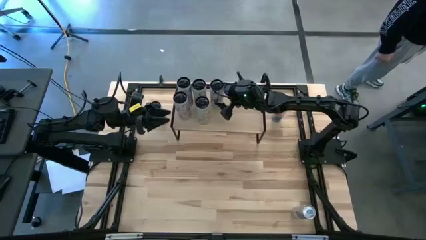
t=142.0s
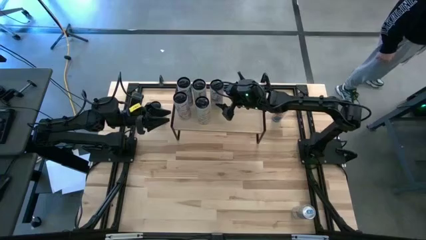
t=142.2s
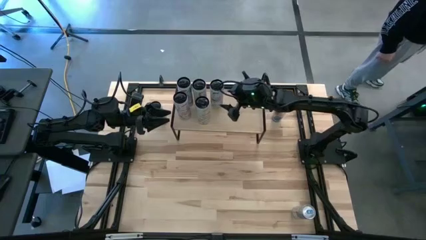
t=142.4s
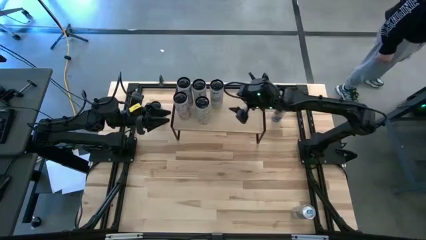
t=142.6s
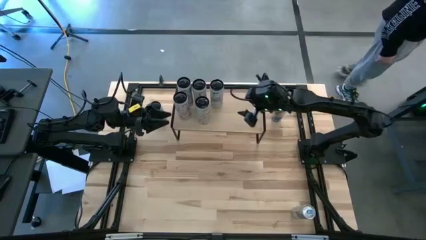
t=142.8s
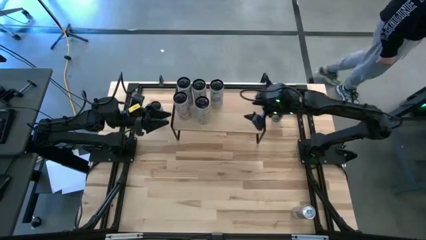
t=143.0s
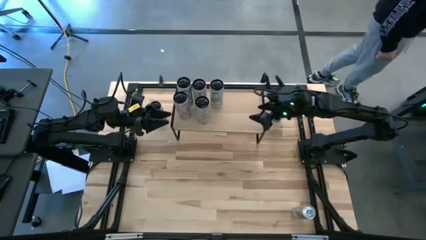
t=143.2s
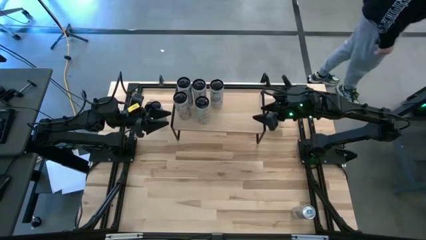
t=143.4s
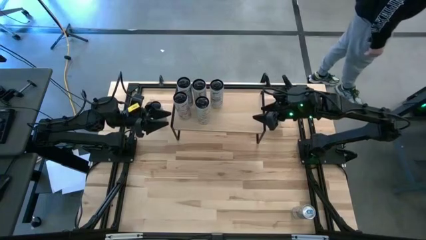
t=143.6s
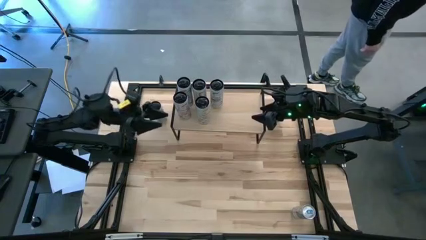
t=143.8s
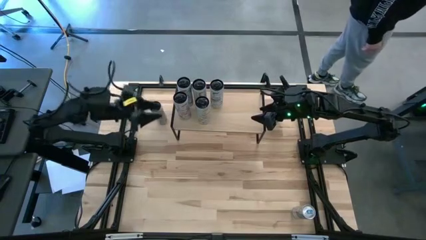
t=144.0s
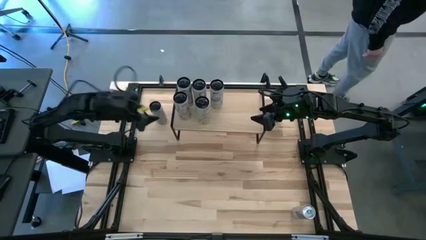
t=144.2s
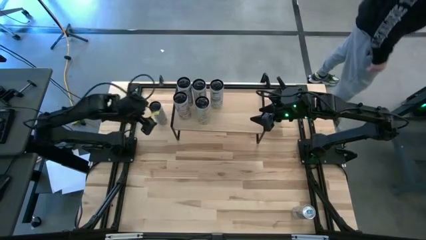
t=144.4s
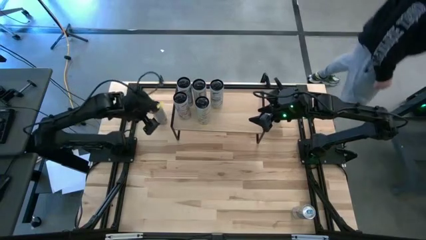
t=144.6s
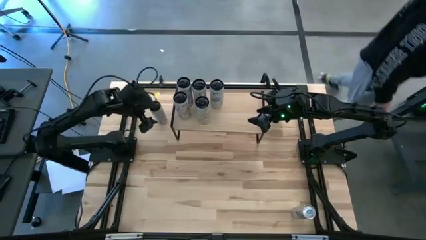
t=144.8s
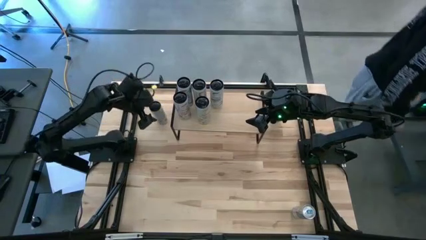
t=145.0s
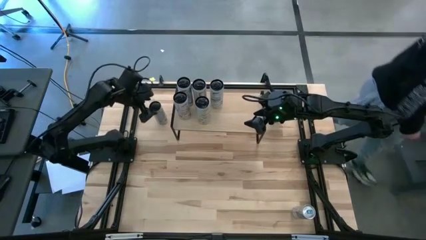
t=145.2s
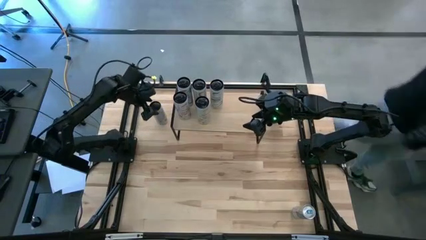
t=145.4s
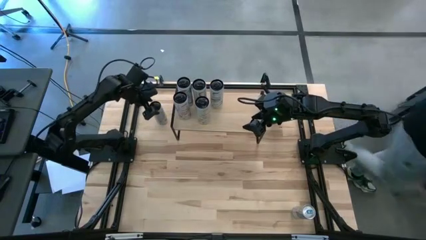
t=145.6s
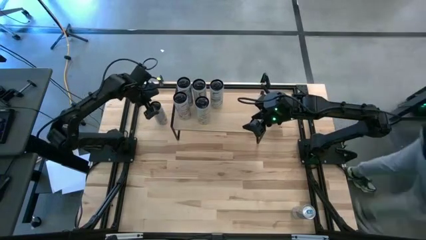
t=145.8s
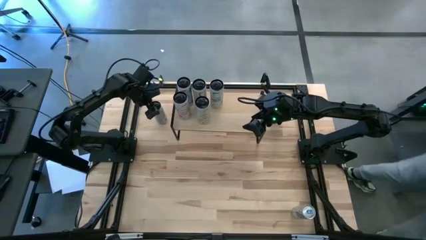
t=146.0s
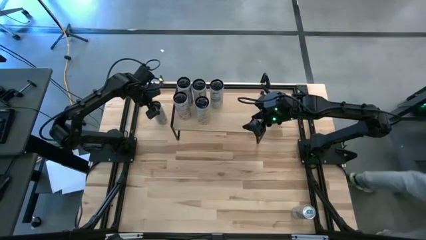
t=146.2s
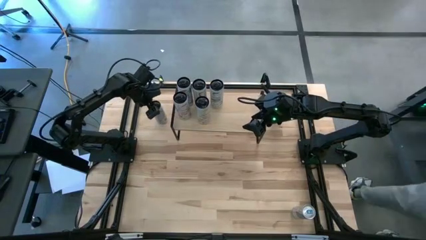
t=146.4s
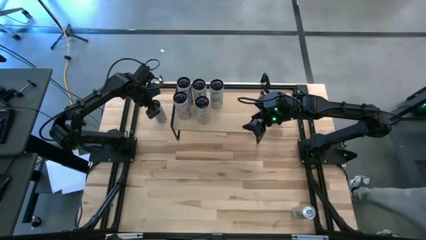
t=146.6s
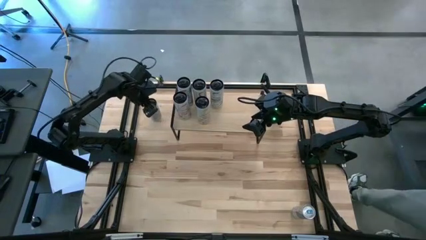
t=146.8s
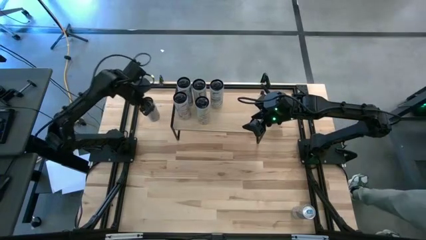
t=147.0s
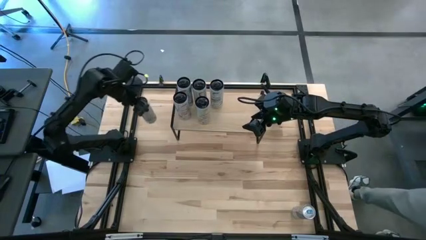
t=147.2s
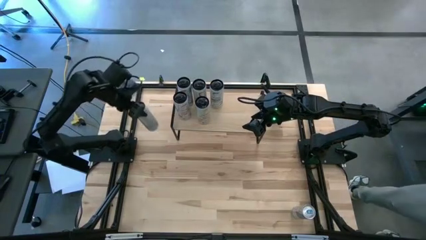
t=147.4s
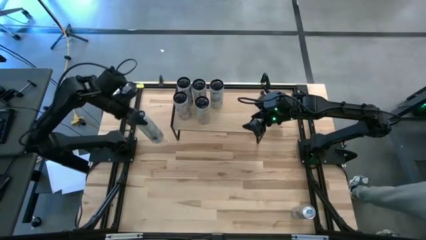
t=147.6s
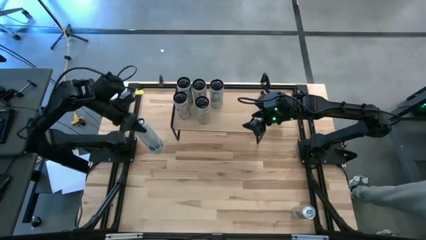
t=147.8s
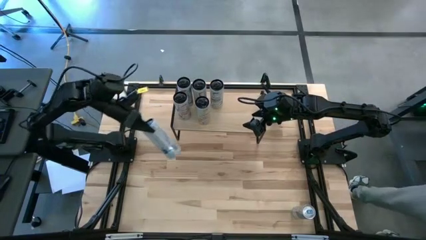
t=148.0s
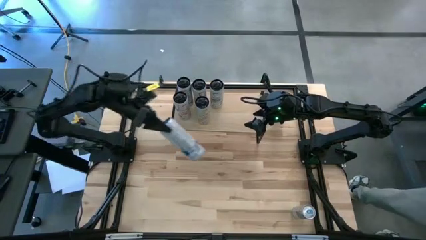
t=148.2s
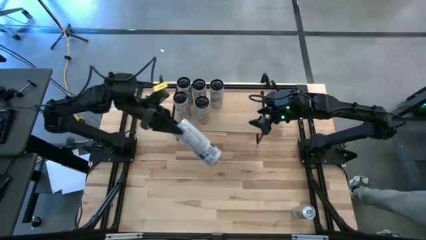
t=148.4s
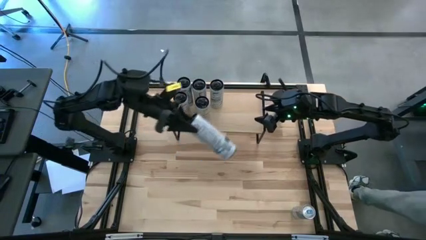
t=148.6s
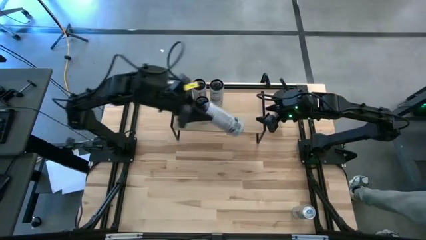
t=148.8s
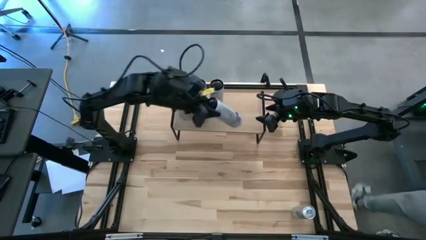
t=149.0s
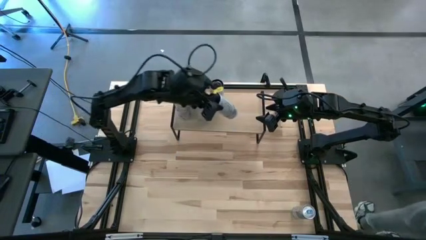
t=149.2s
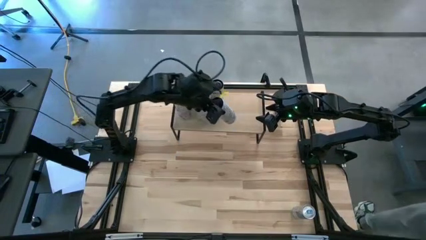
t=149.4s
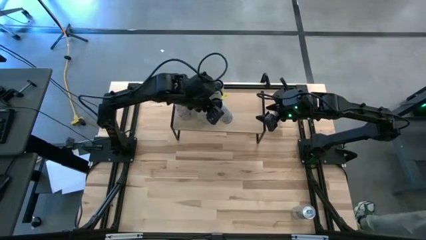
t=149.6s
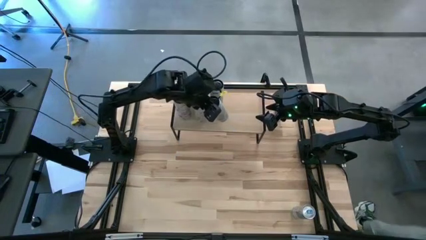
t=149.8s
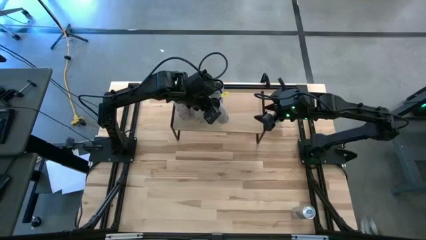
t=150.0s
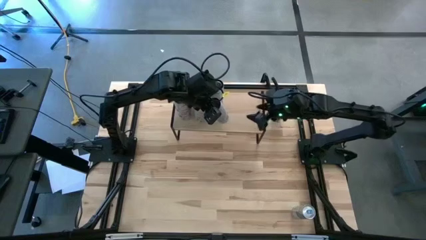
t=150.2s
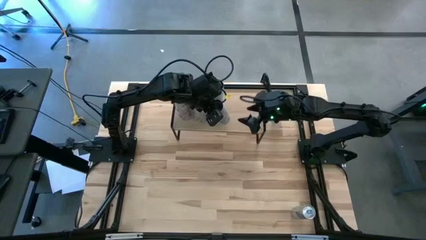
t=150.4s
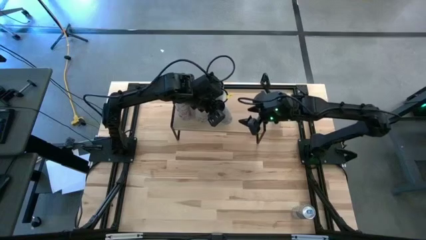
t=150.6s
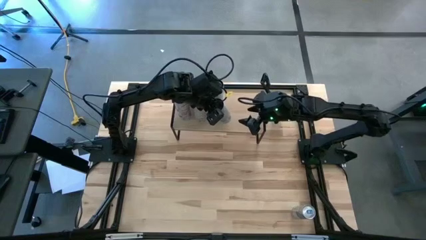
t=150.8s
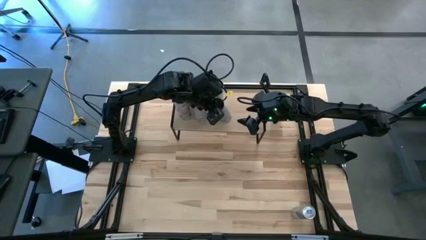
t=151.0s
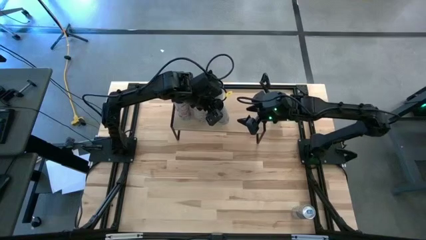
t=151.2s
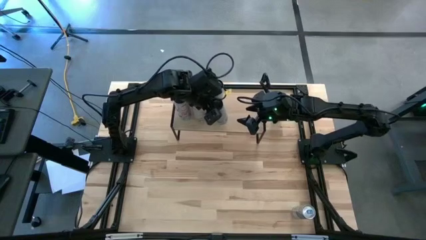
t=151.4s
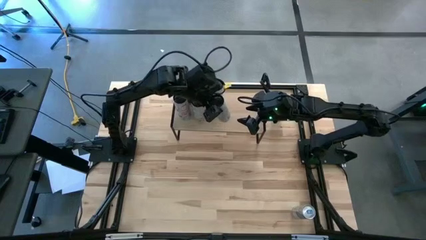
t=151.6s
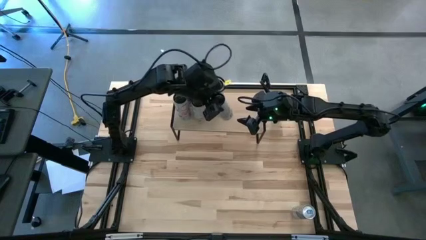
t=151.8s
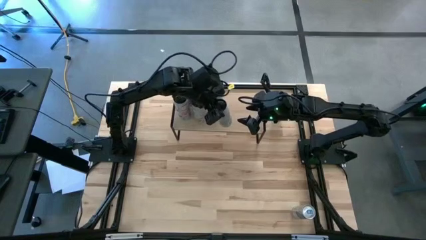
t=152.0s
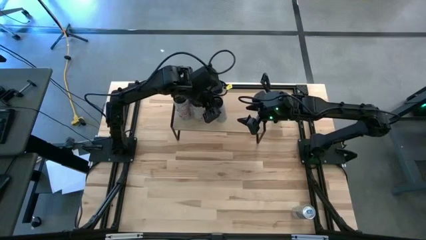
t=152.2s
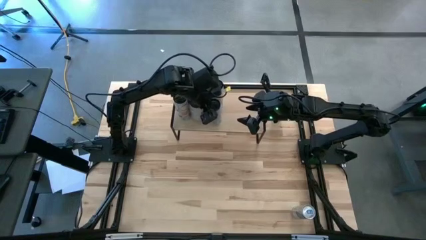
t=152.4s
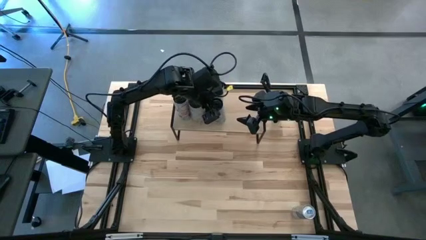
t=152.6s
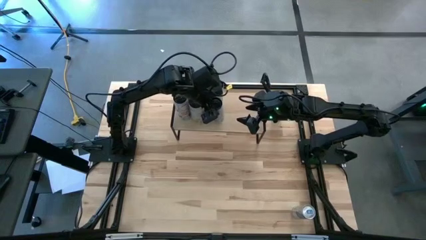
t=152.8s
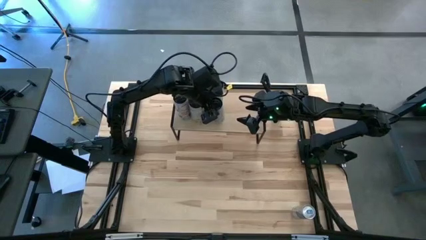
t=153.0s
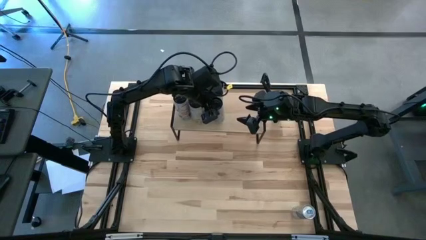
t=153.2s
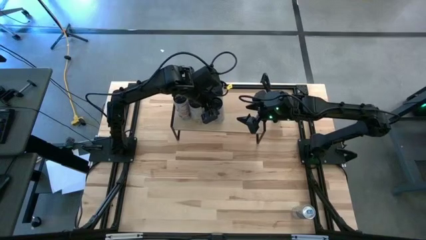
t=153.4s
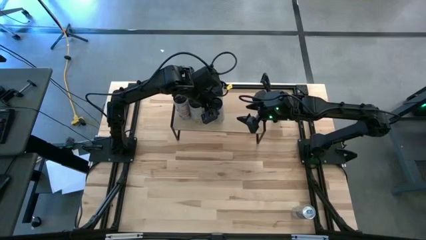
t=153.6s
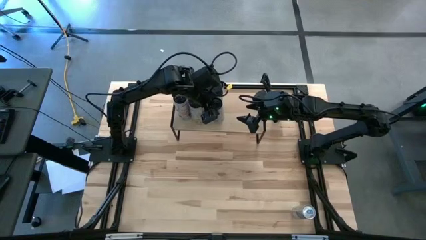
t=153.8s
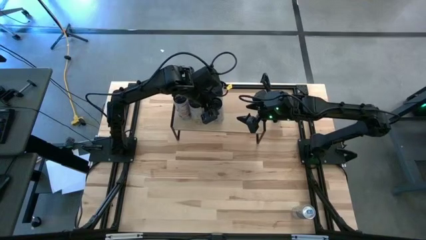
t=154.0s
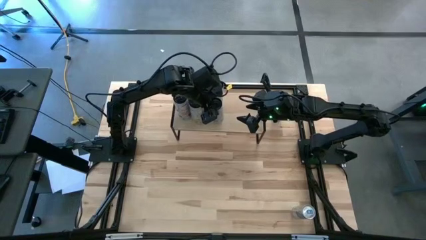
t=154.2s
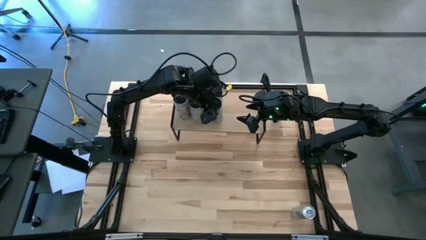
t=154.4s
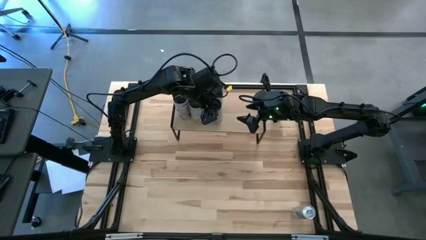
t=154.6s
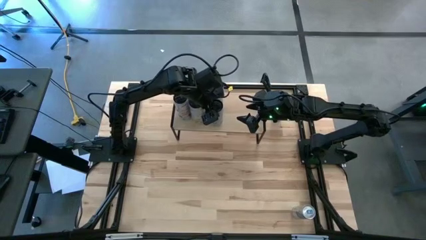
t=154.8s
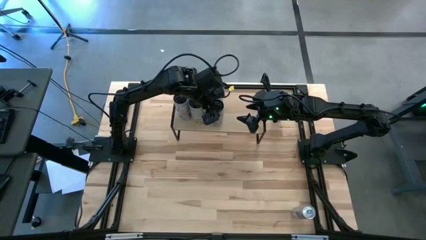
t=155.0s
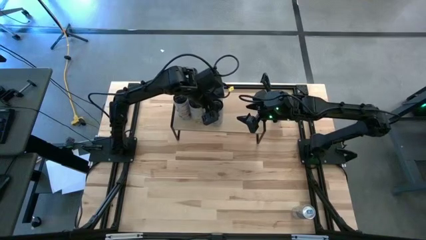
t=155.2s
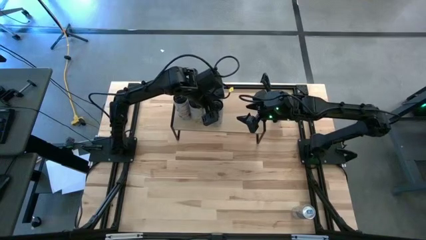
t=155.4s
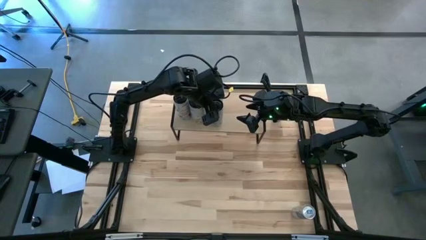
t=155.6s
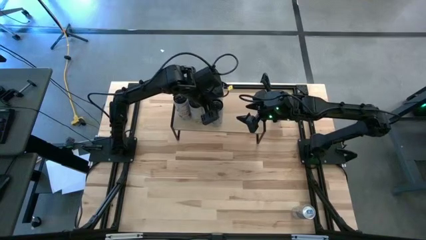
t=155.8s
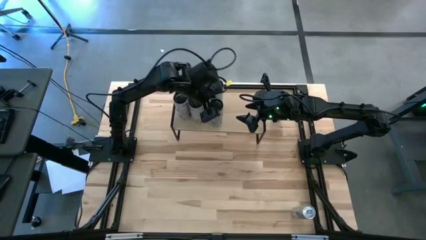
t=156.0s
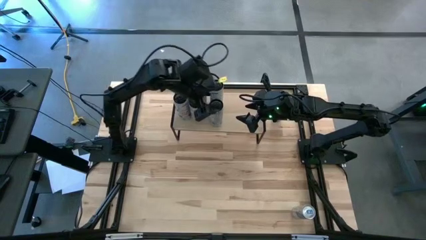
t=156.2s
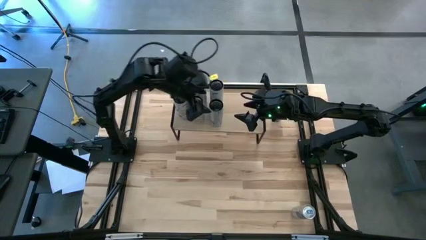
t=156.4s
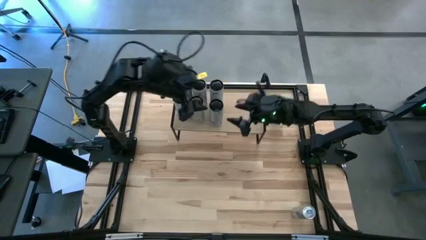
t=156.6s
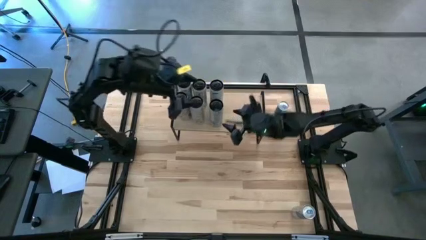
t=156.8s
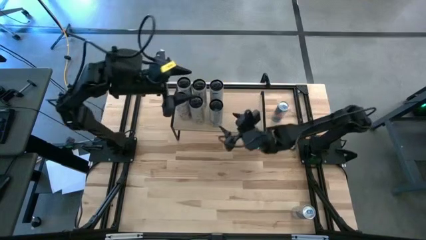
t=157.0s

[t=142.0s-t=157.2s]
Task: Place canned beverage on shelf
Put the white blue soda can on the shelf aligned with the other white blue soda can
